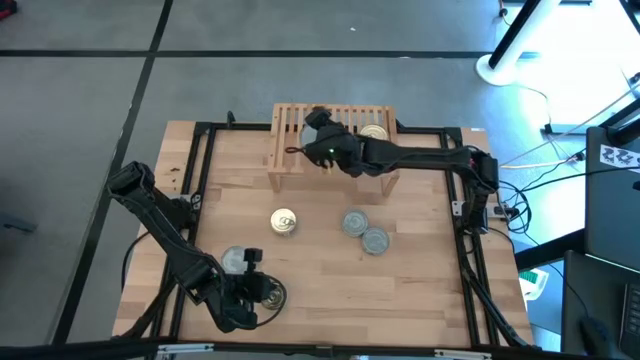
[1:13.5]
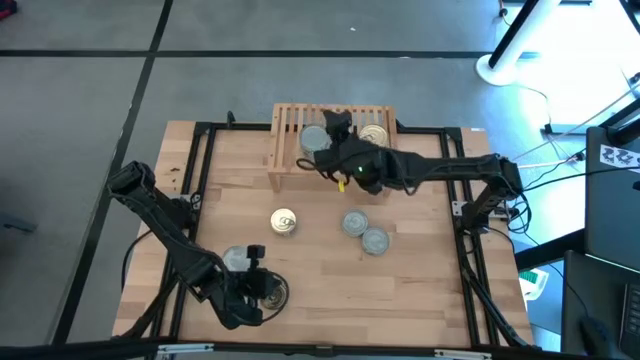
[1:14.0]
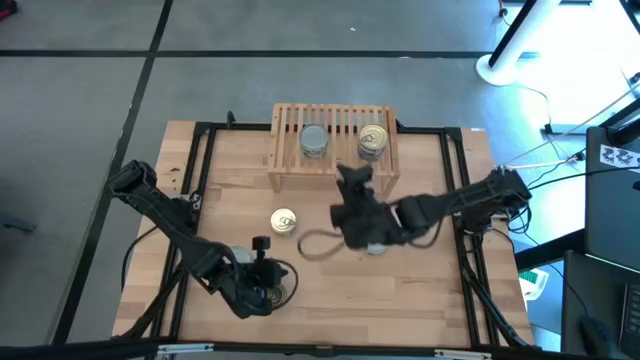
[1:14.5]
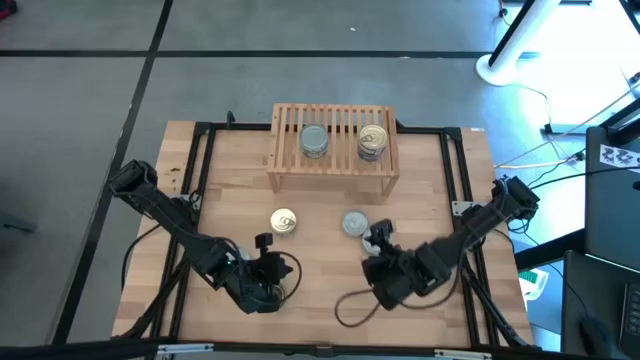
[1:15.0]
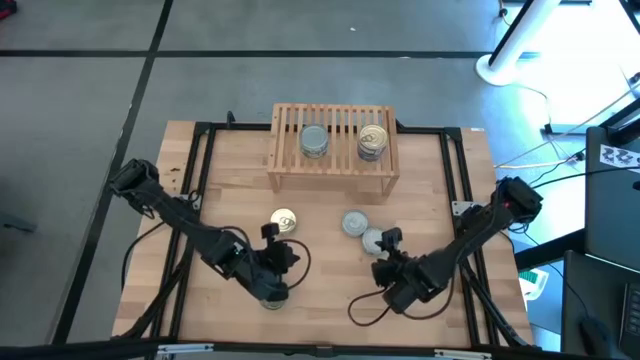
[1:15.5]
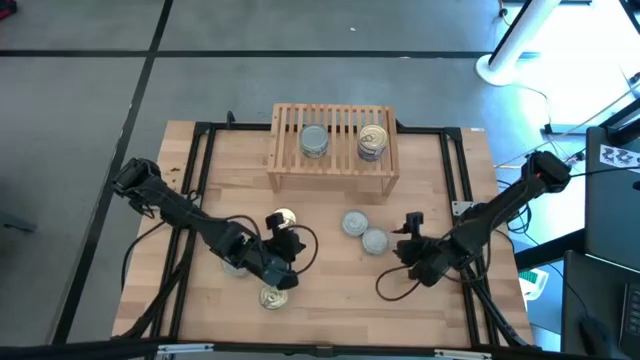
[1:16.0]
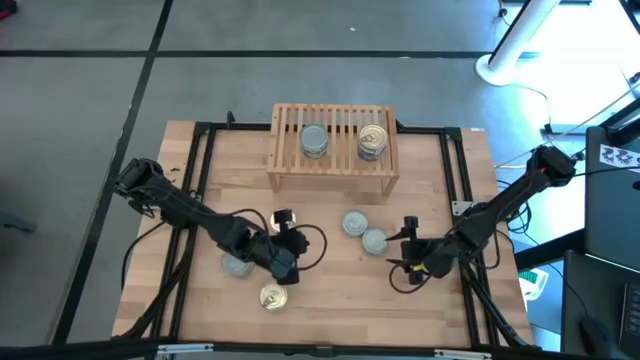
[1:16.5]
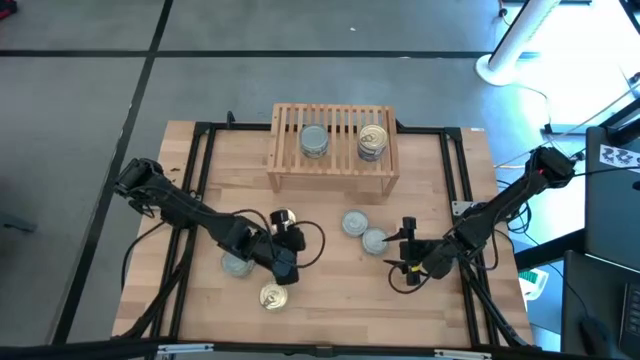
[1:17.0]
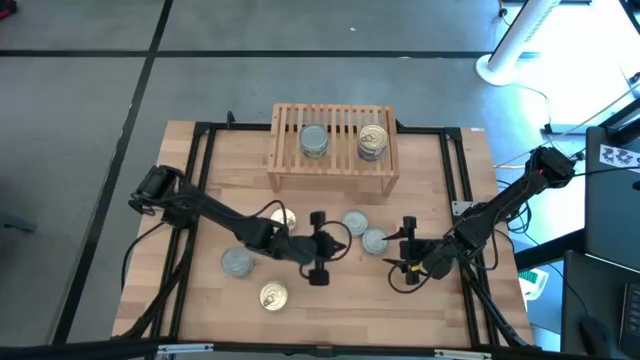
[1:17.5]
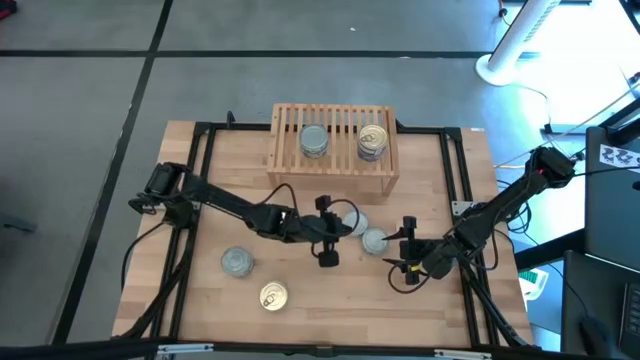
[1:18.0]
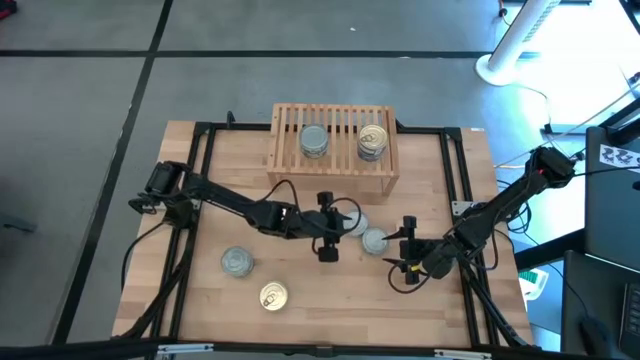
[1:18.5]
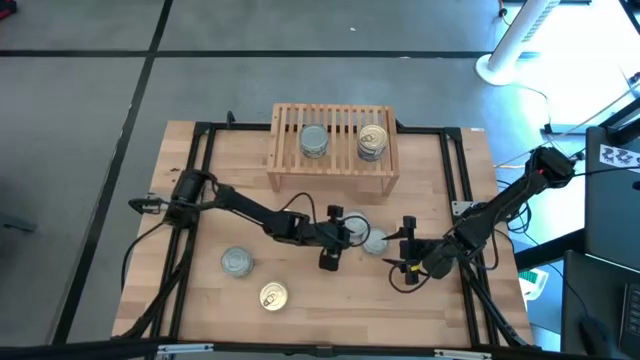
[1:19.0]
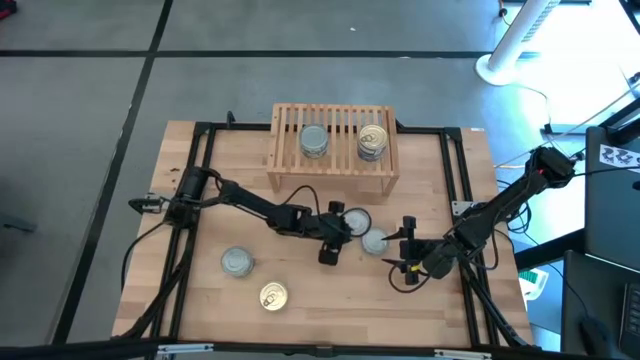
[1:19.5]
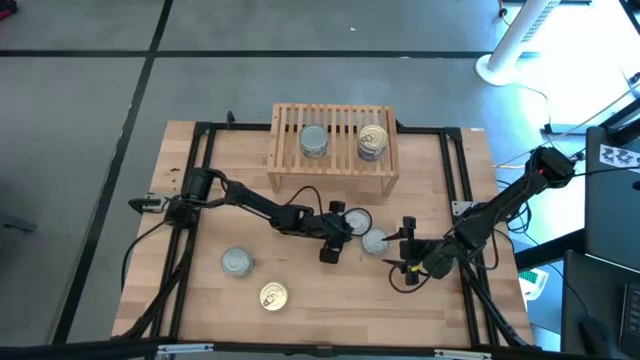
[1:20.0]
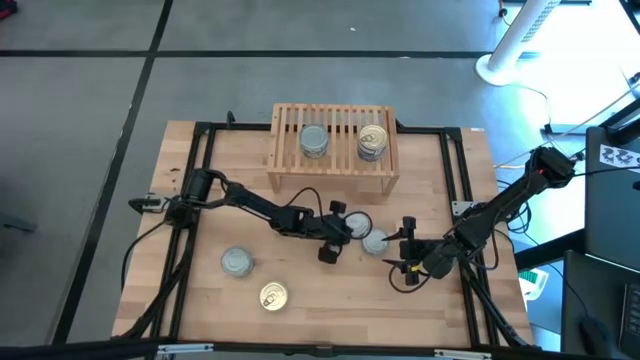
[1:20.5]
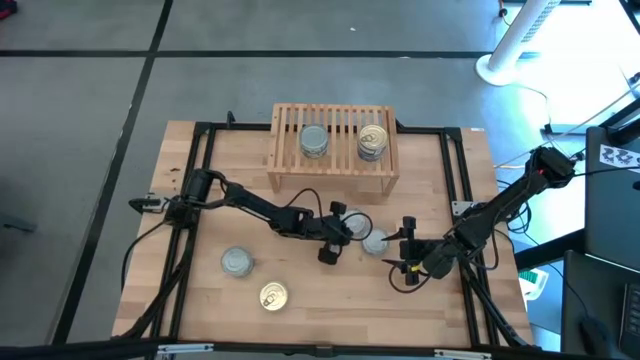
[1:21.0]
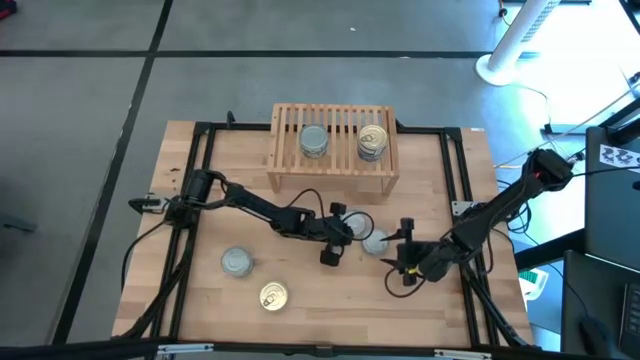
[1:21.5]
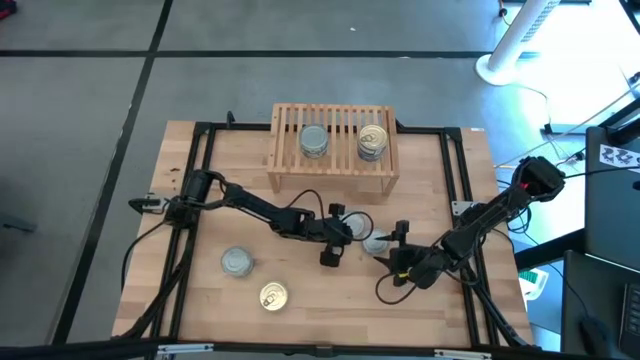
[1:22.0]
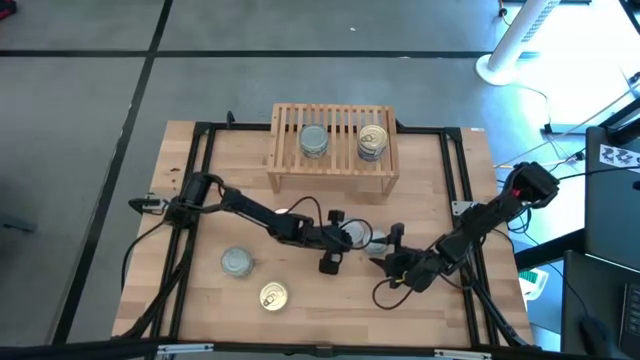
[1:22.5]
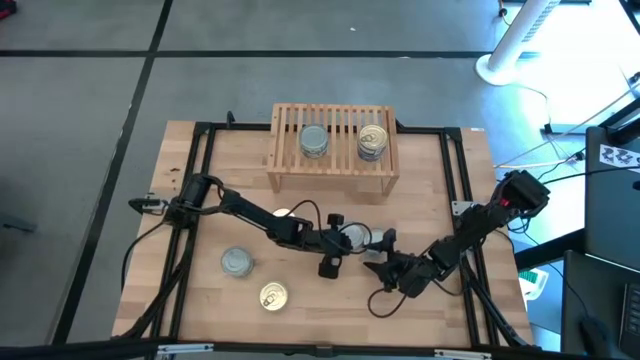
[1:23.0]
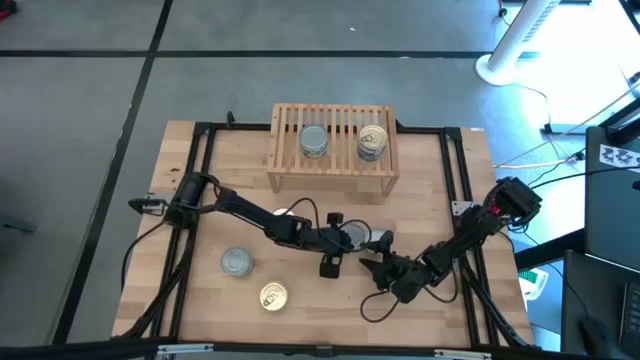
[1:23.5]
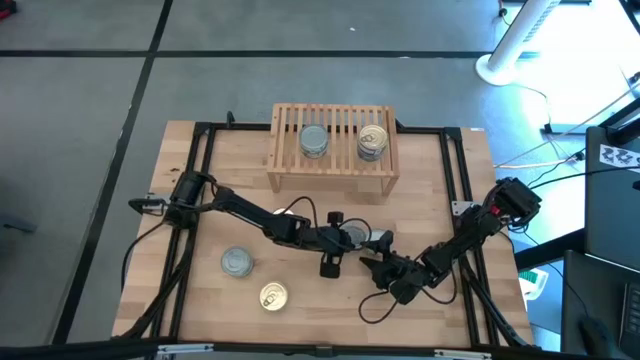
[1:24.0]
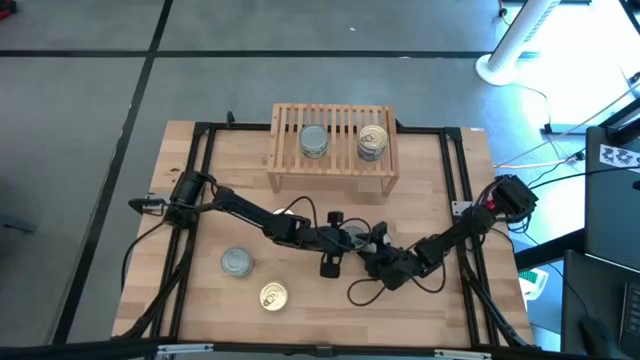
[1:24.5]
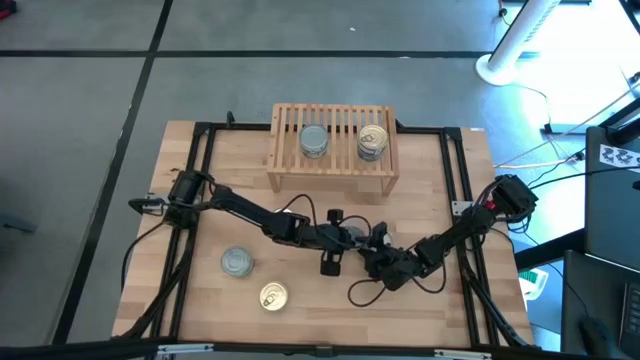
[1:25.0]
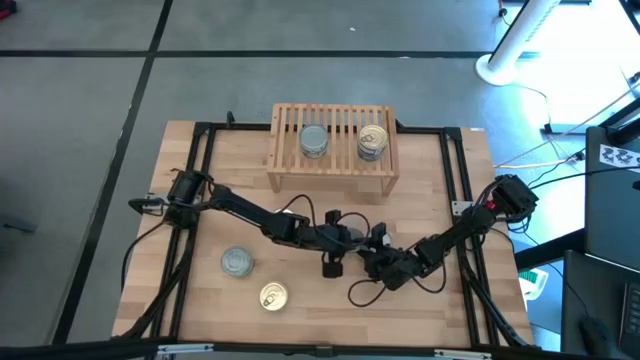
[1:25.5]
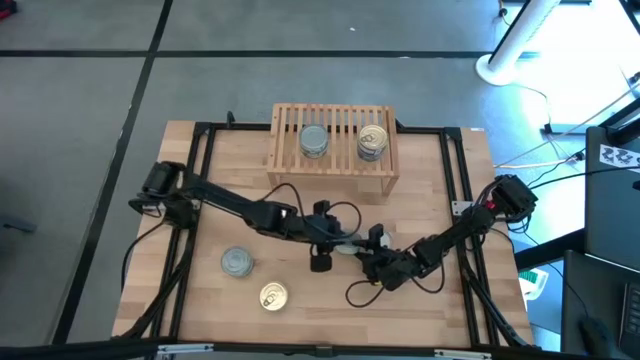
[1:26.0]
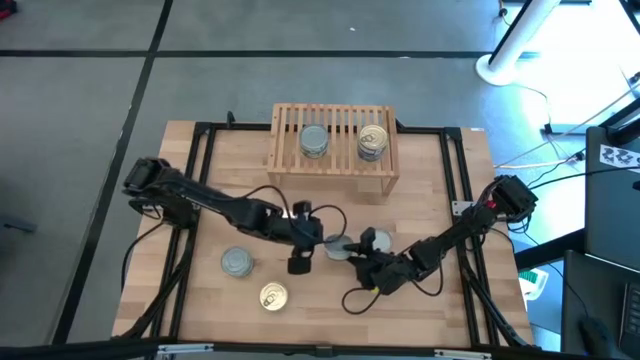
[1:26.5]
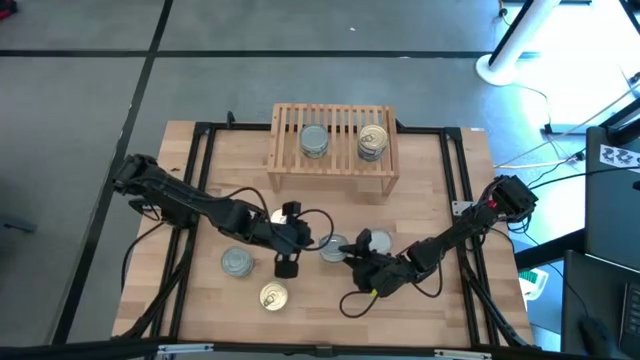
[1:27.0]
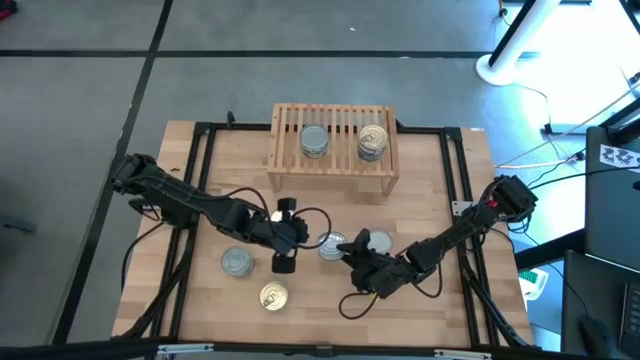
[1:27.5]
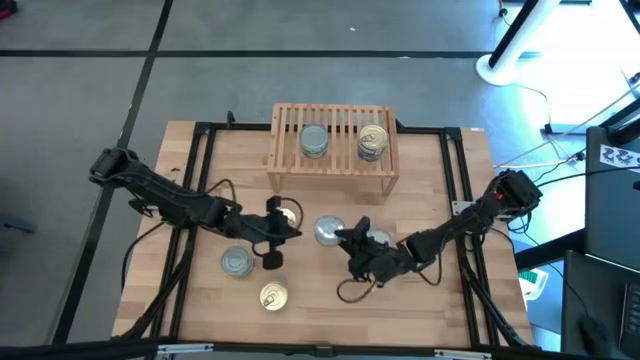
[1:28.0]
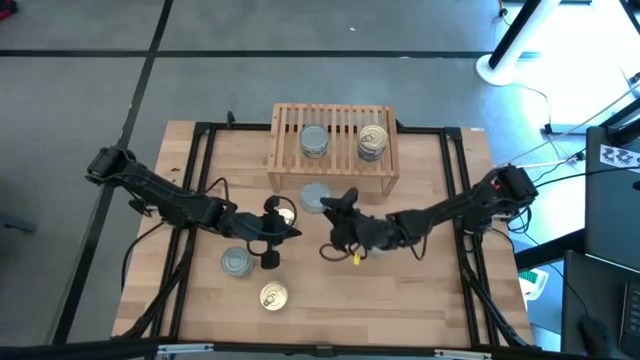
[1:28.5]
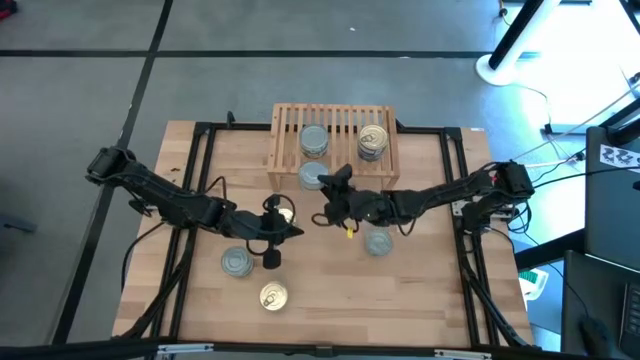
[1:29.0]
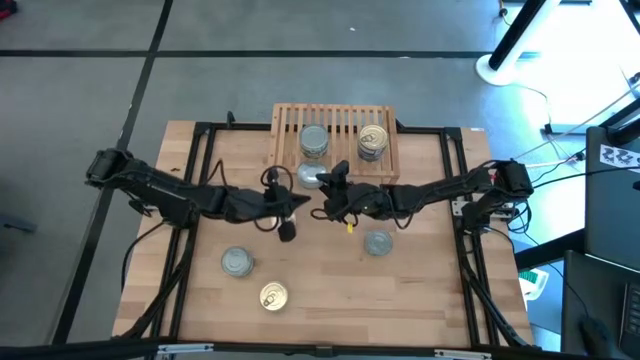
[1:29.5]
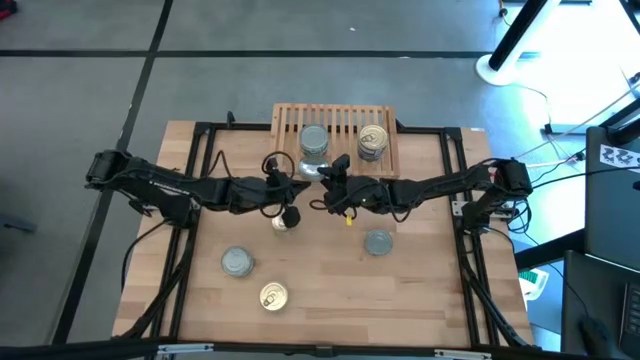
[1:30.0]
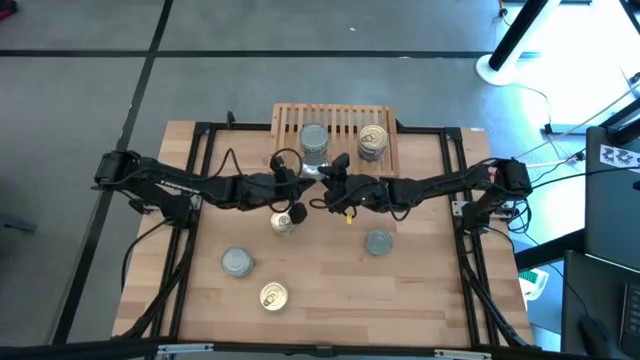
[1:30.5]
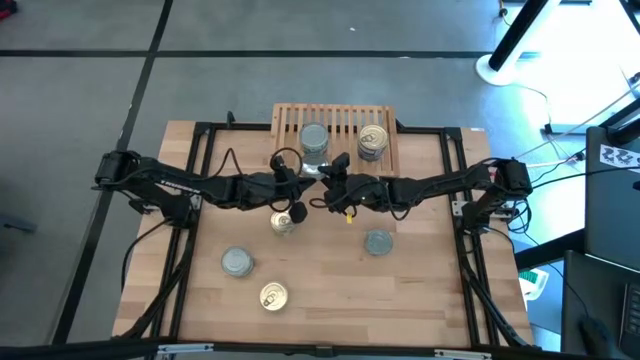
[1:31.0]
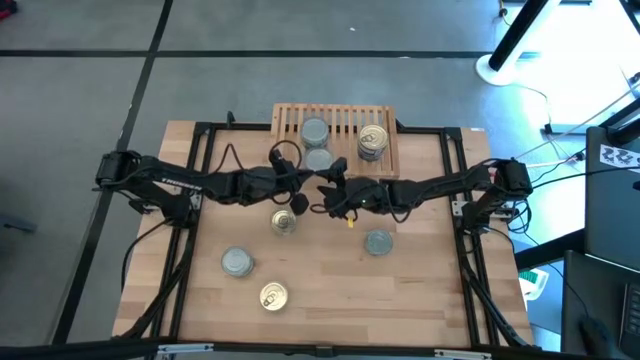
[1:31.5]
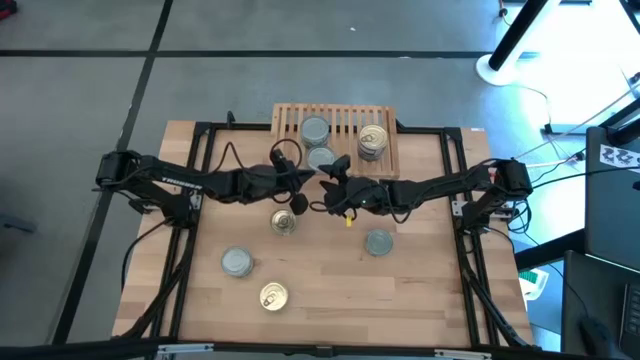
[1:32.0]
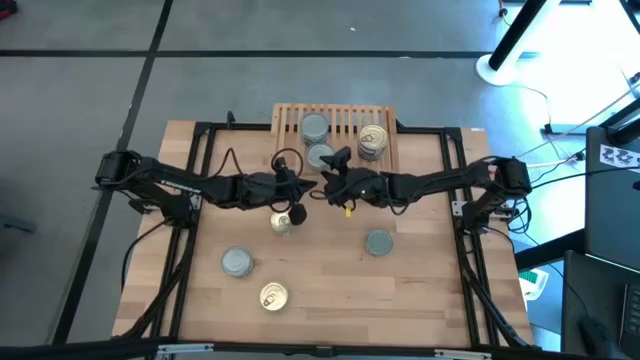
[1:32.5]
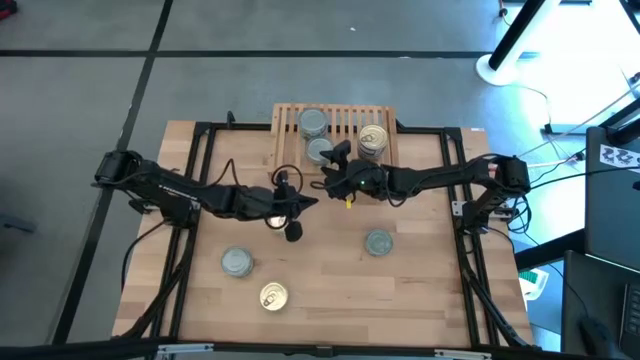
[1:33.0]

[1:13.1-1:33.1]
Task: Stack canned seafood by type on shelf
Put the green white tuna can on the shelf aligned with the other green white tuna can
